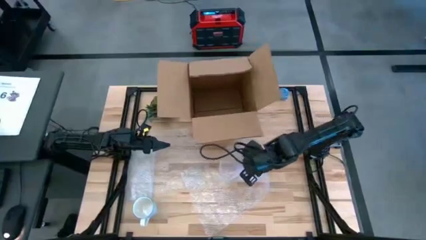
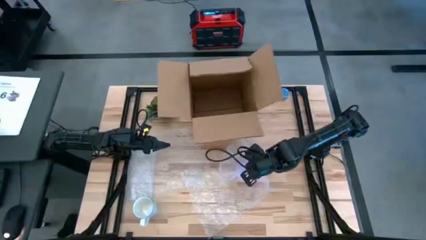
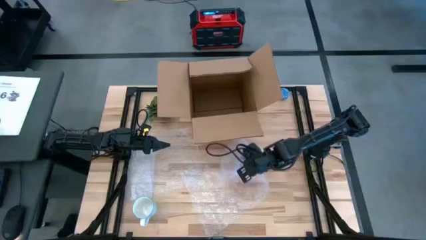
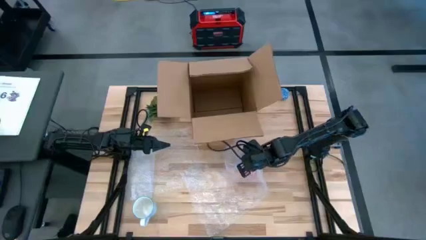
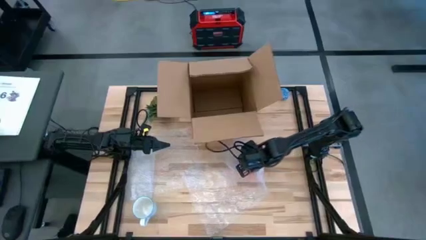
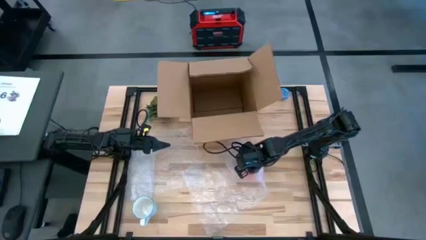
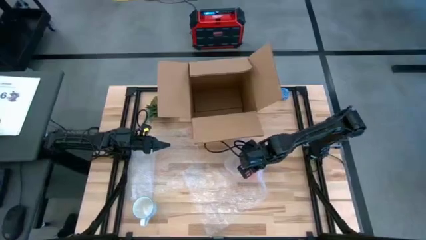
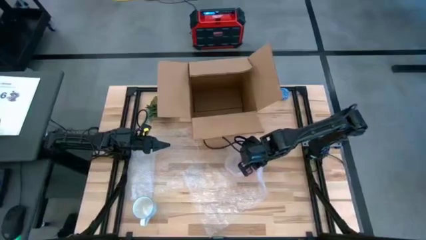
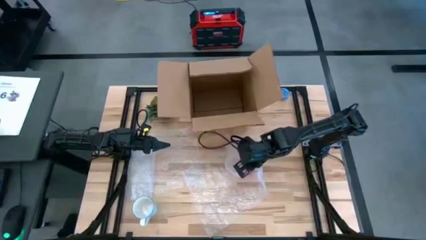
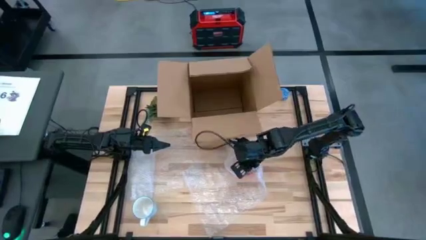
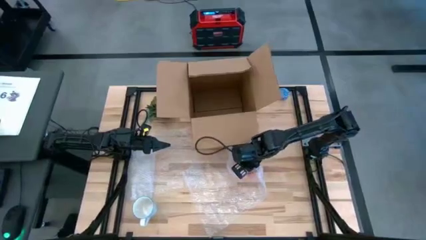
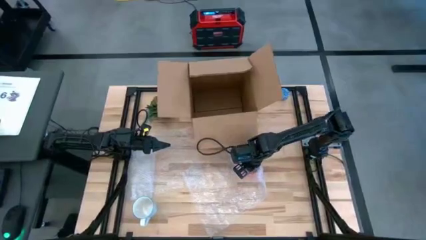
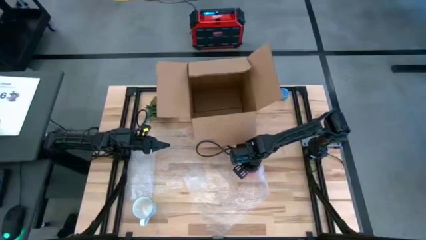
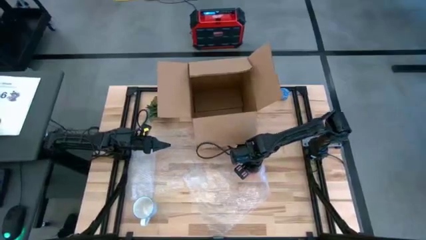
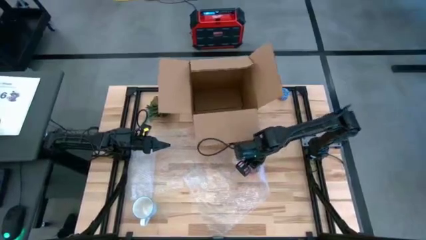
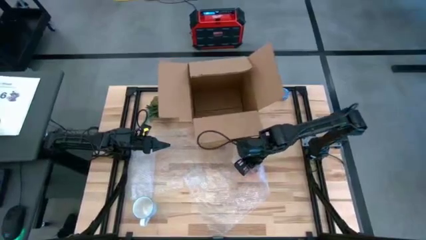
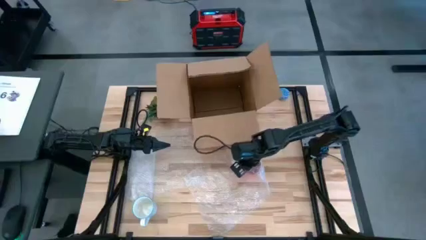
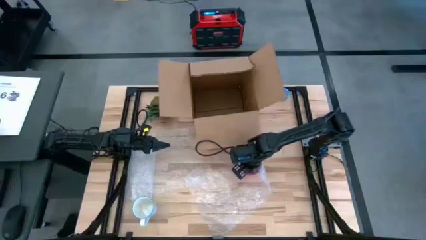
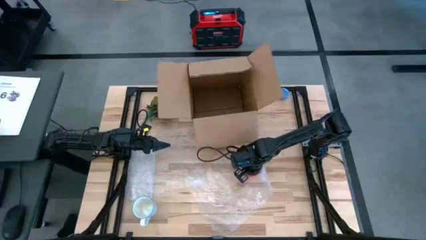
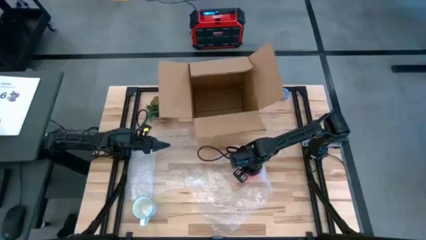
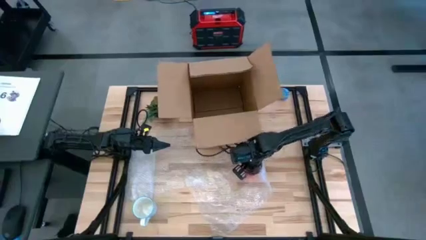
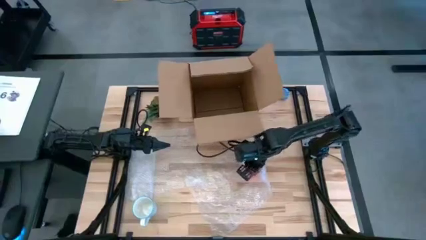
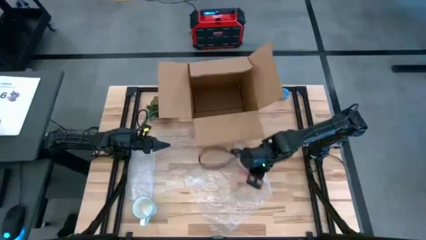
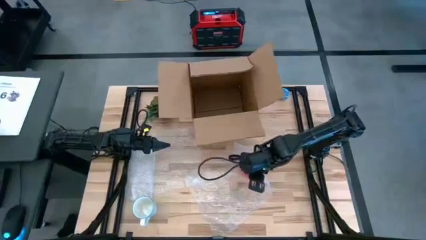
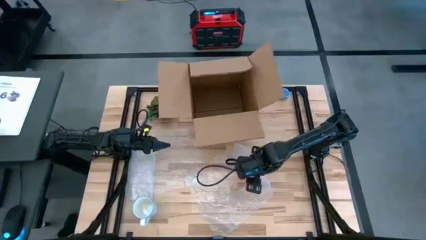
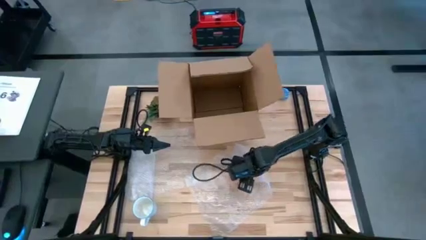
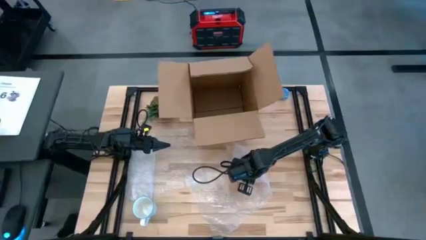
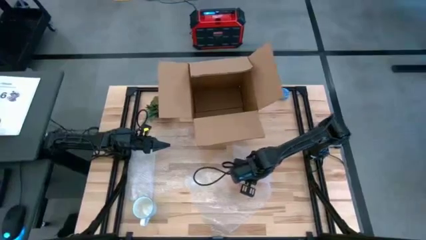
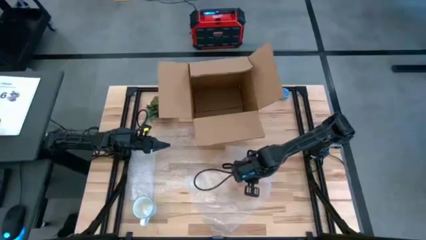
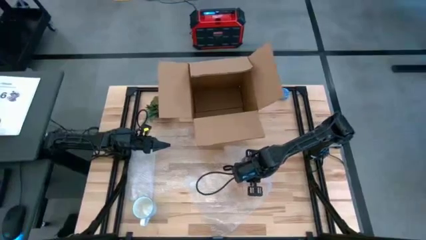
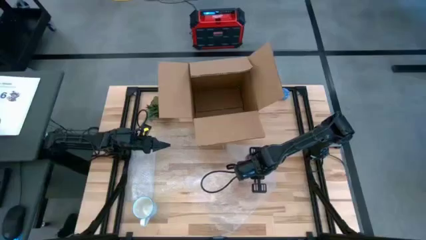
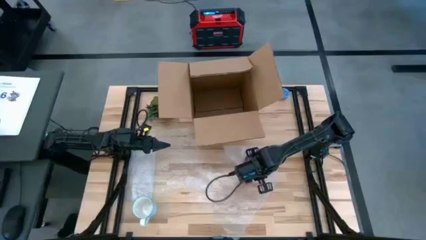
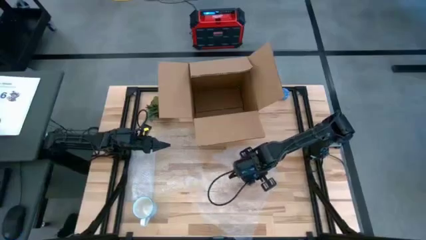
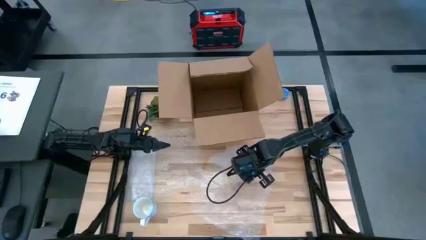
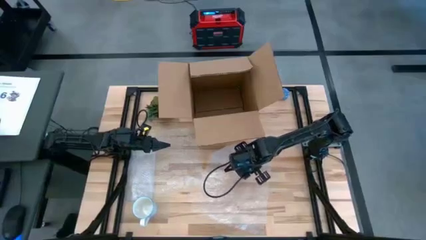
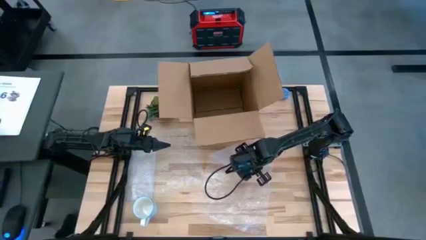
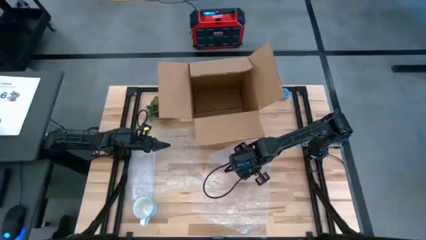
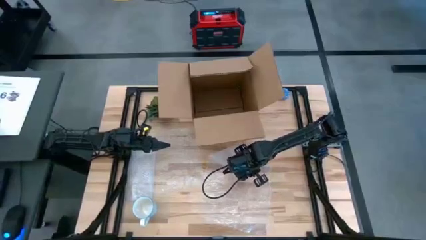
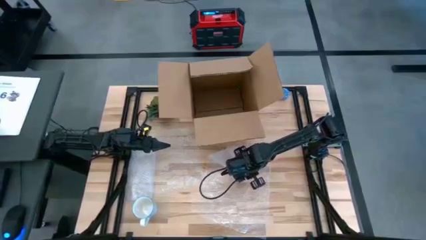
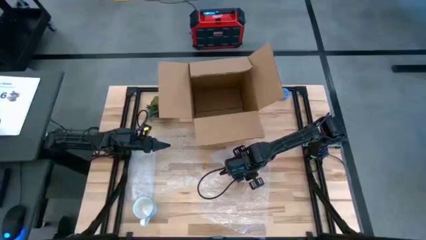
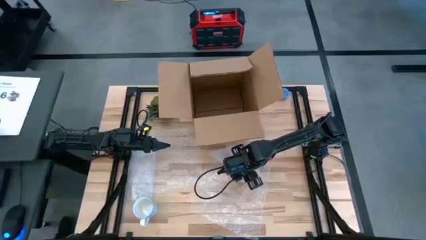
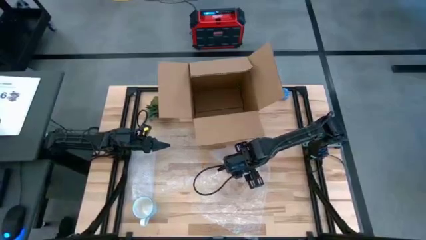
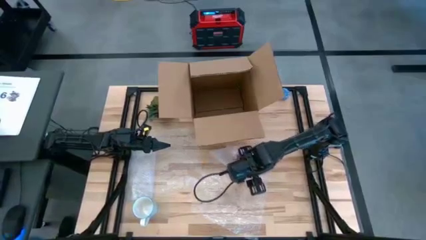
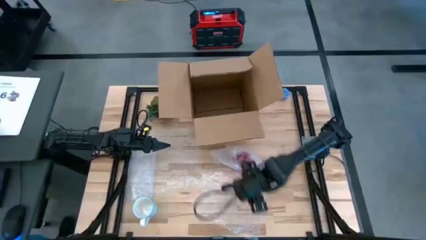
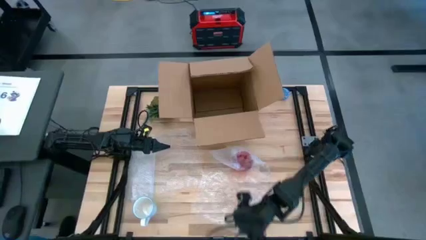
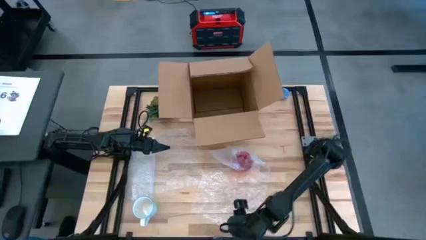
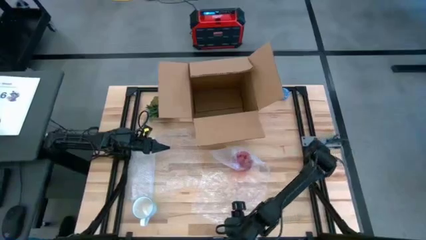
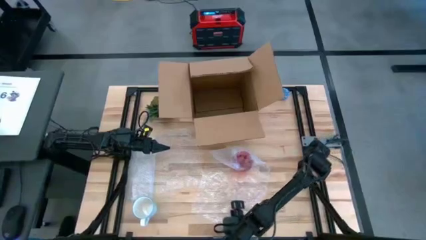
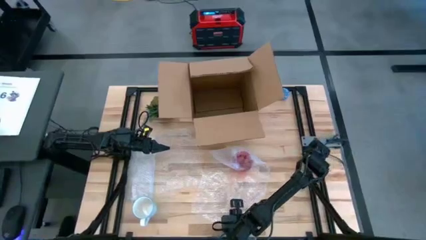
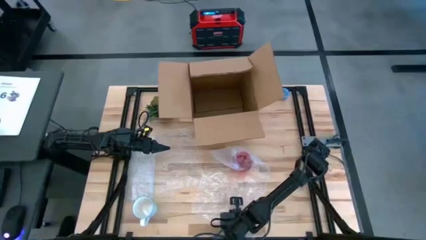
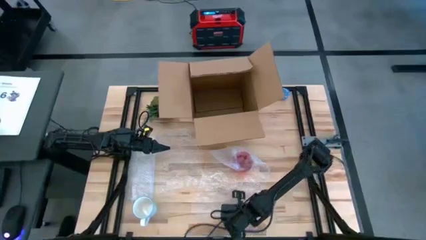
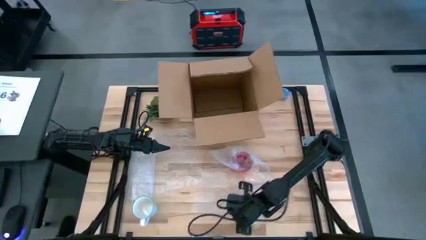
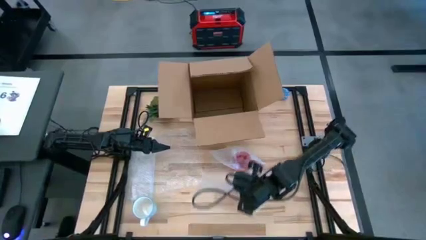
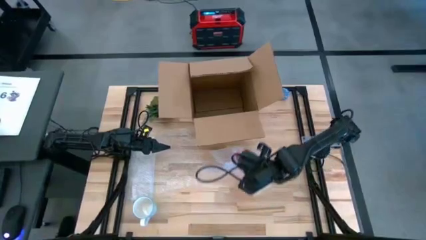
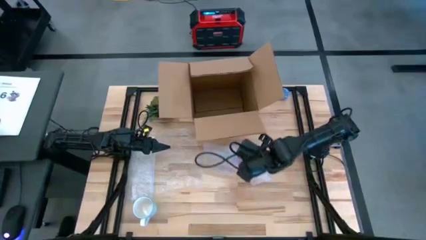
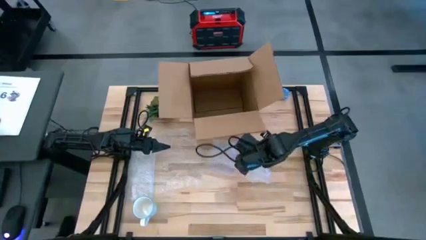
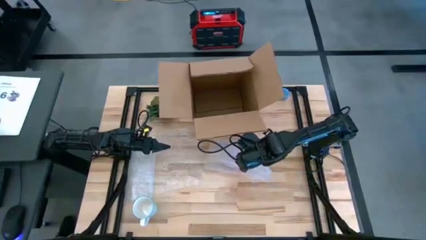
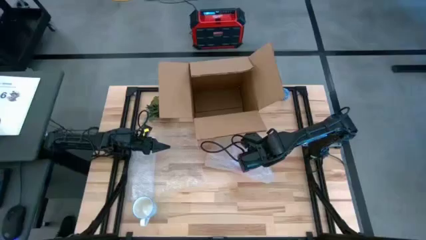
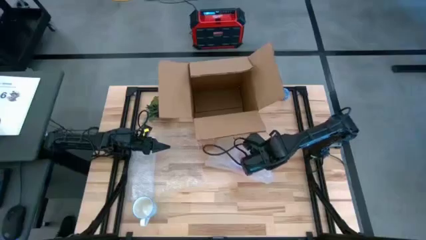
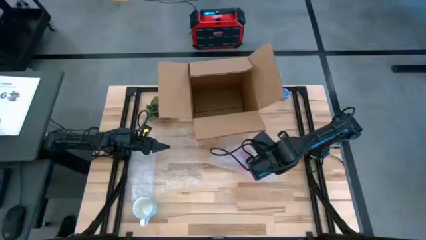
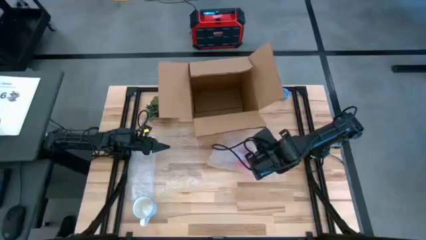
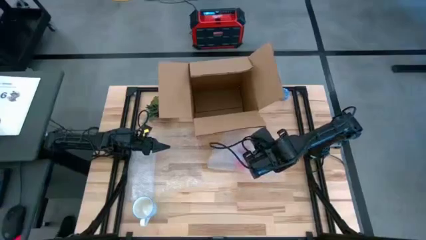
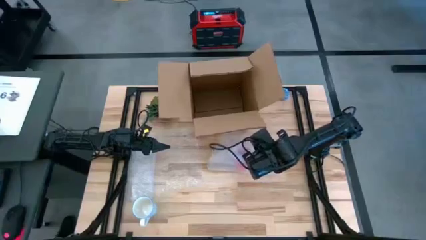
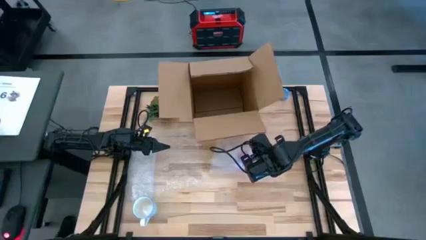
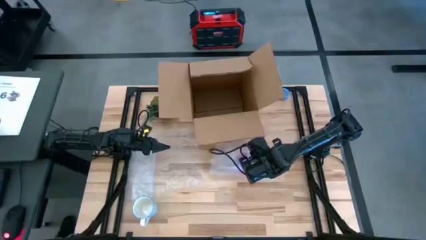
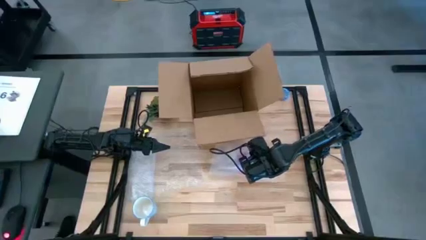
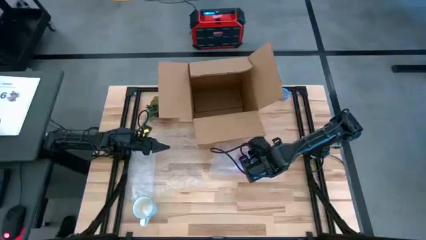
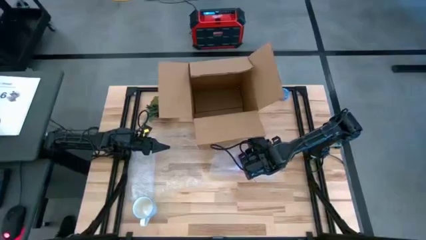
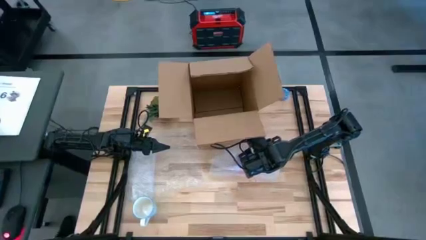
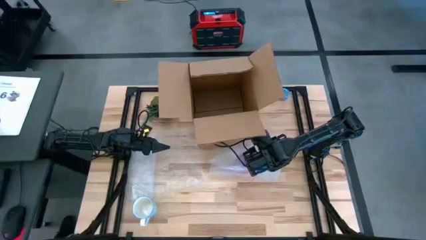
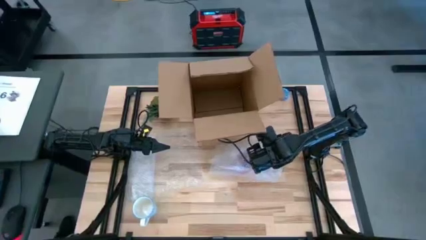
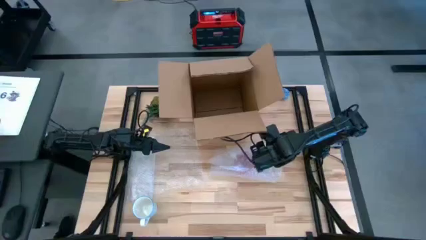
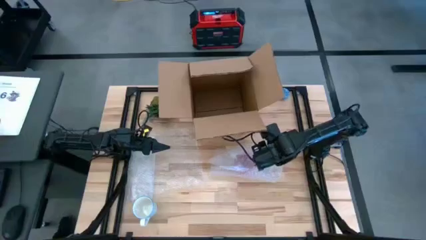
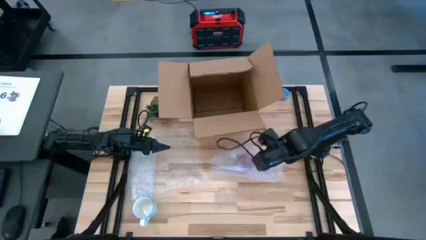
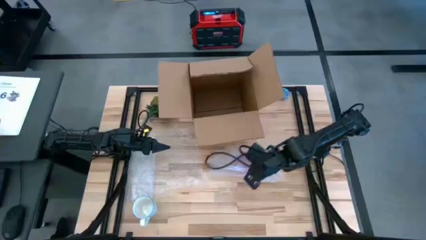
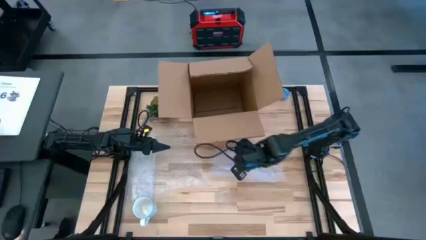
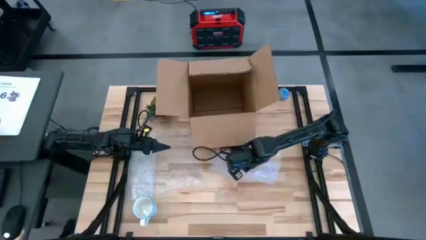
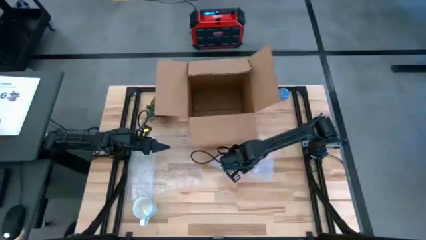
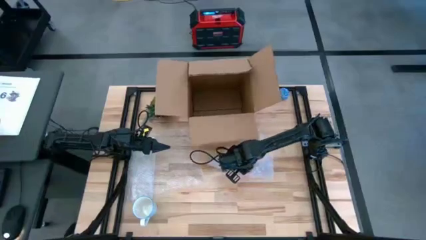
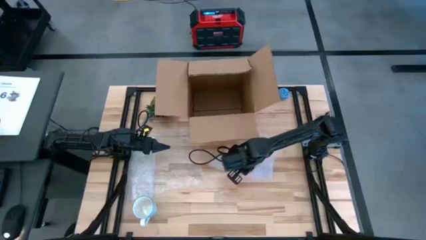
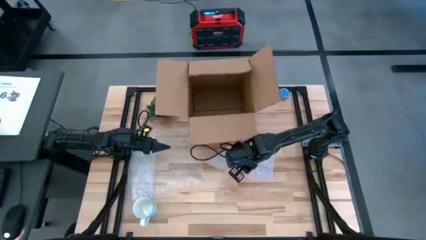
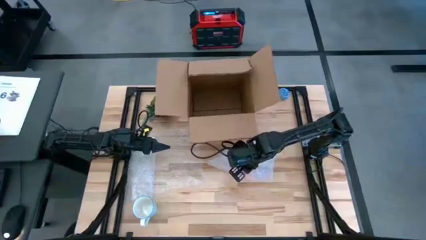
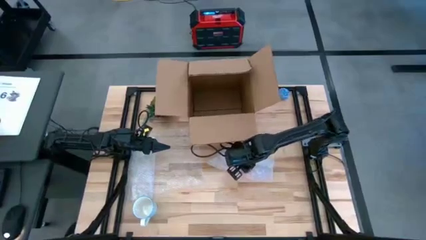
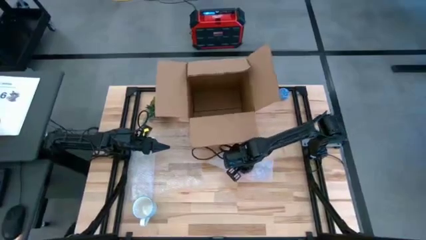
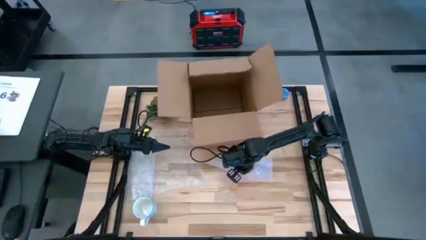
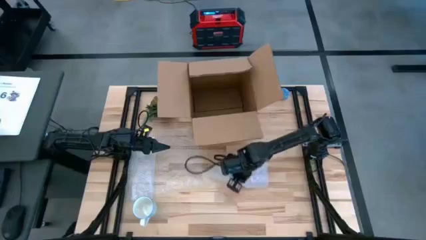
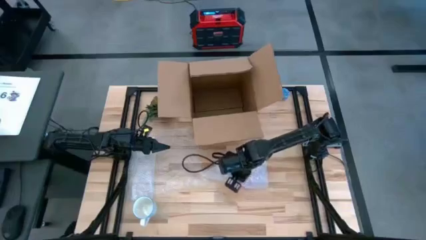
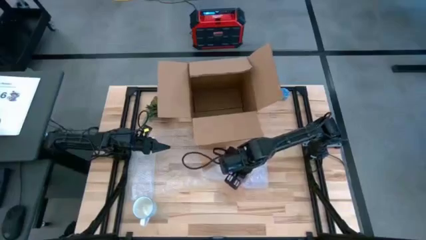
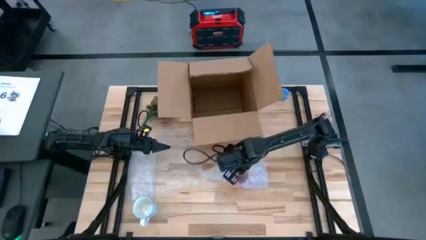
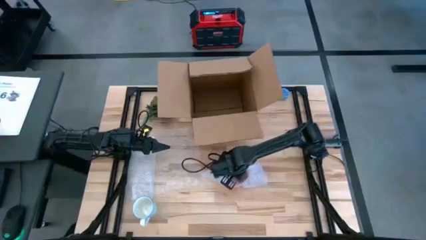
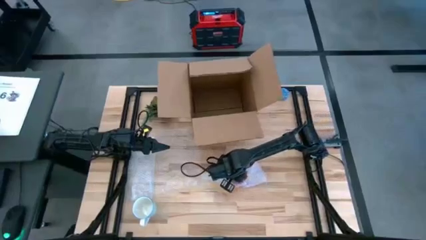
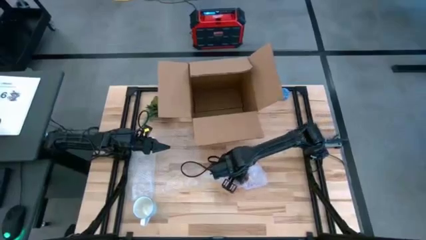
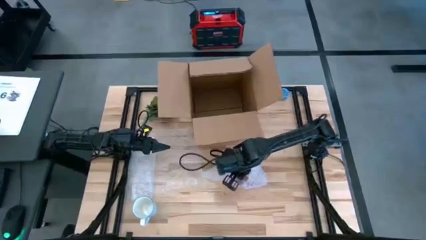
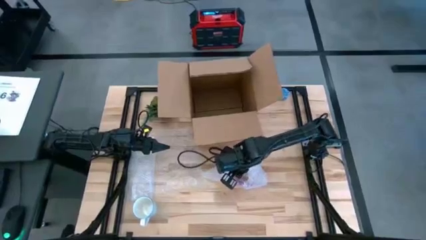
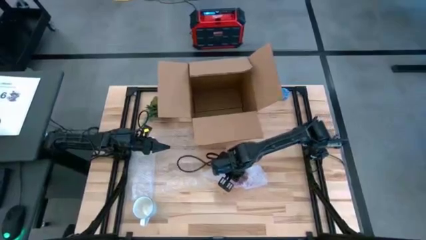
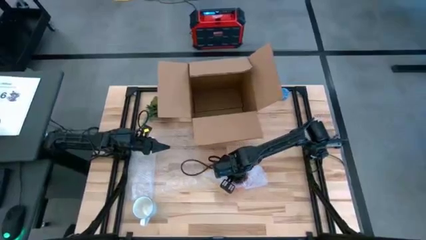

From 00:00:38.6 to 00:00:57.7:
Task: wrap mug
Wrap the red mug with bubble wrap
